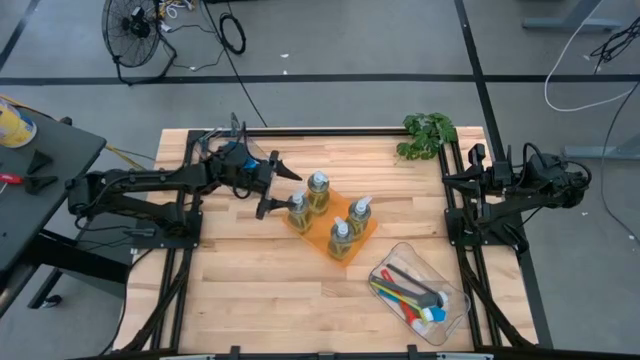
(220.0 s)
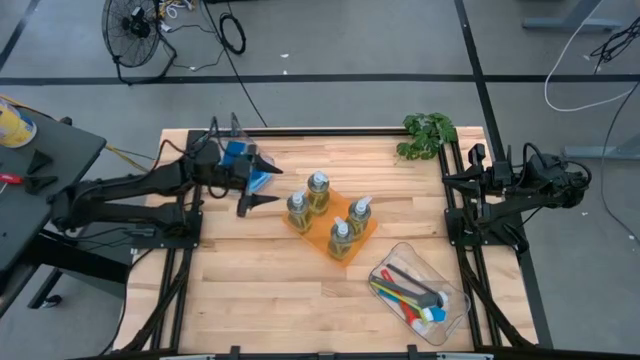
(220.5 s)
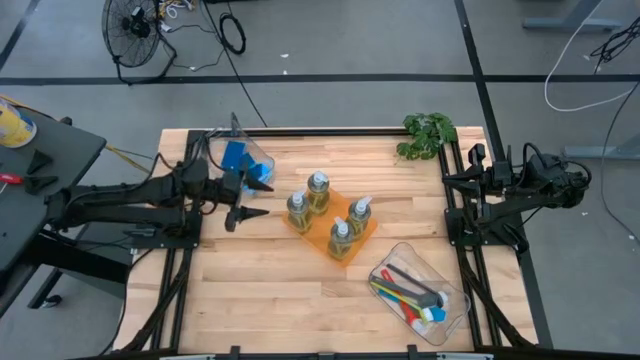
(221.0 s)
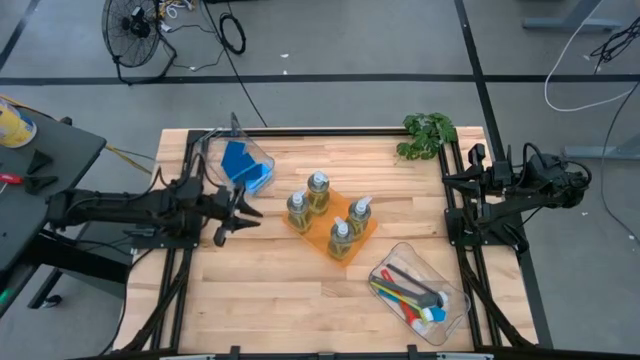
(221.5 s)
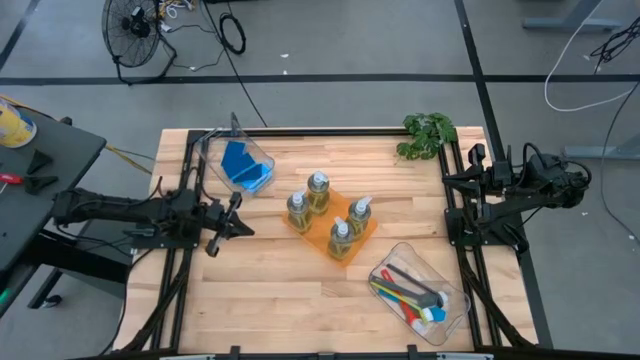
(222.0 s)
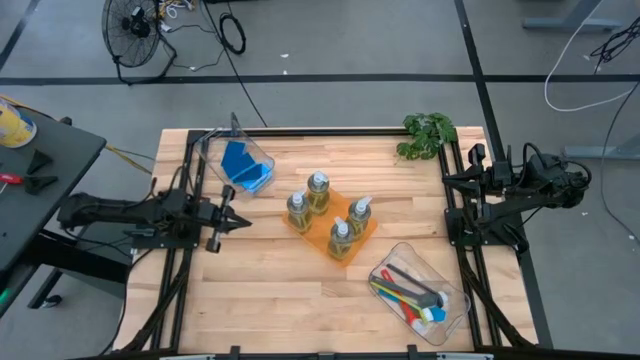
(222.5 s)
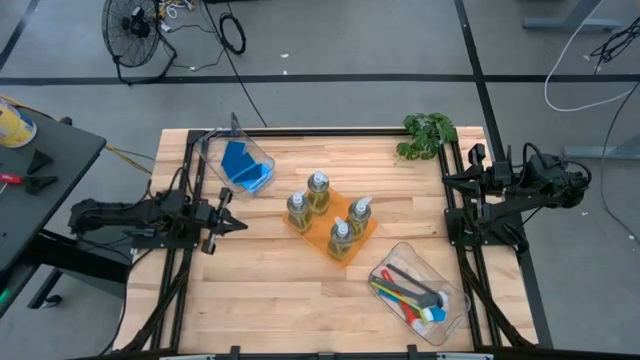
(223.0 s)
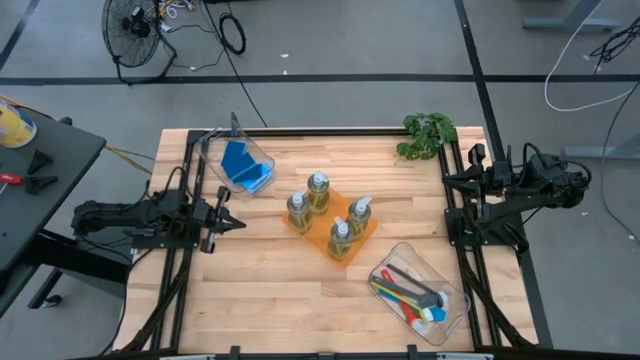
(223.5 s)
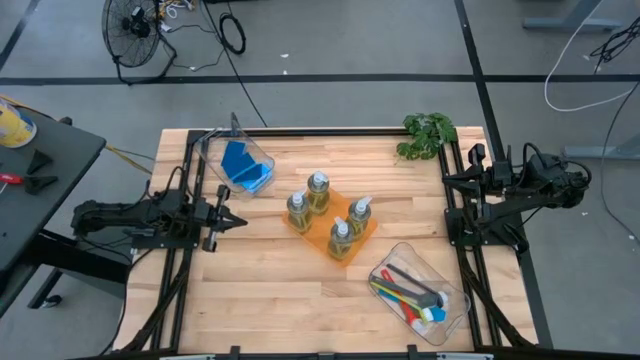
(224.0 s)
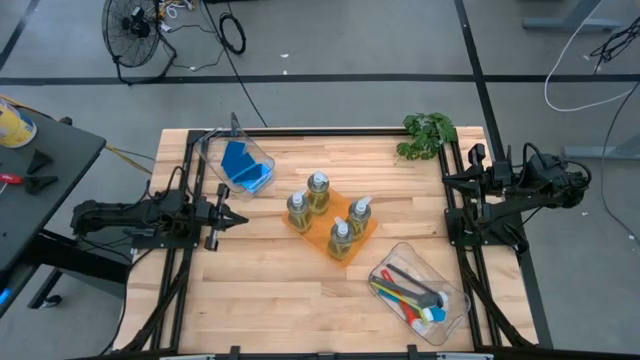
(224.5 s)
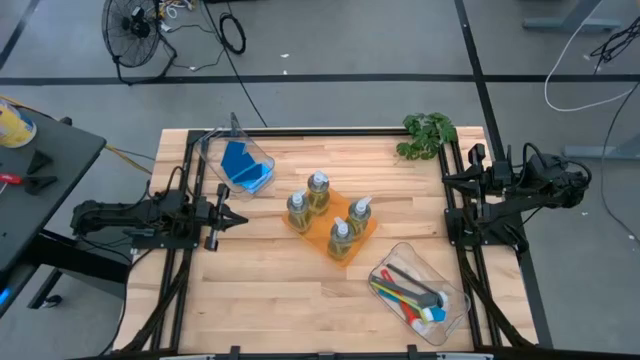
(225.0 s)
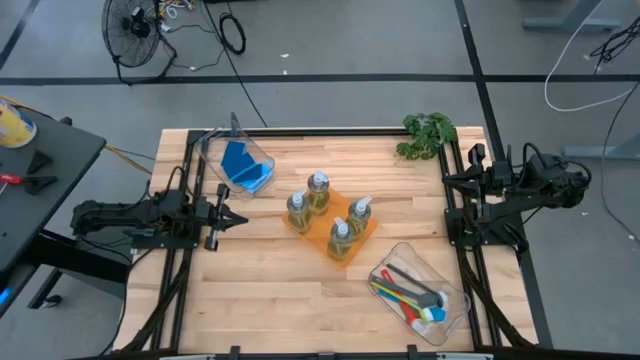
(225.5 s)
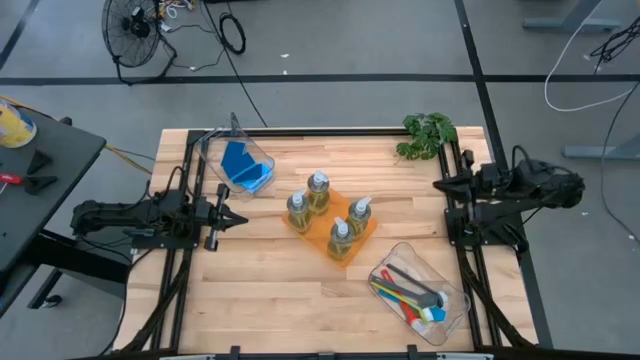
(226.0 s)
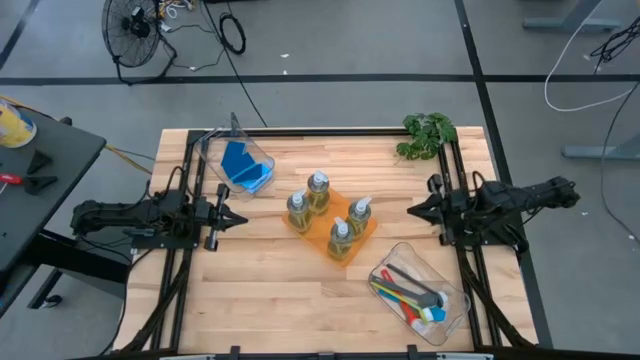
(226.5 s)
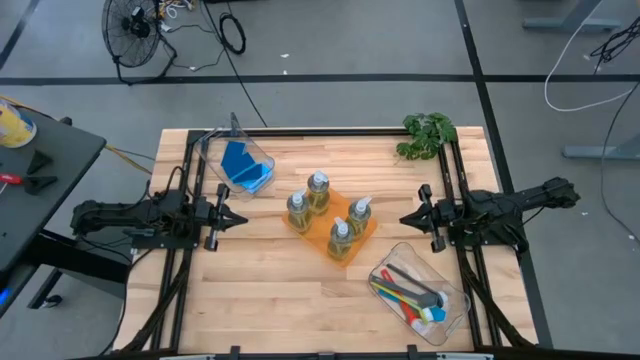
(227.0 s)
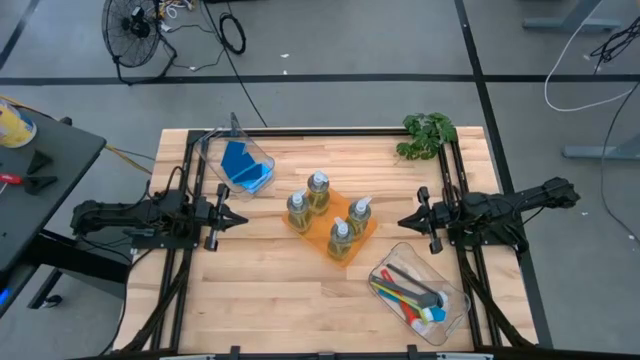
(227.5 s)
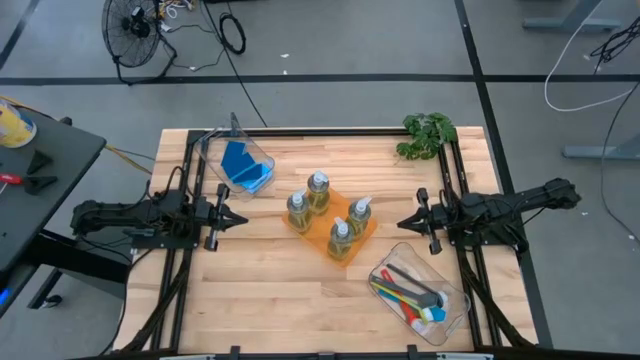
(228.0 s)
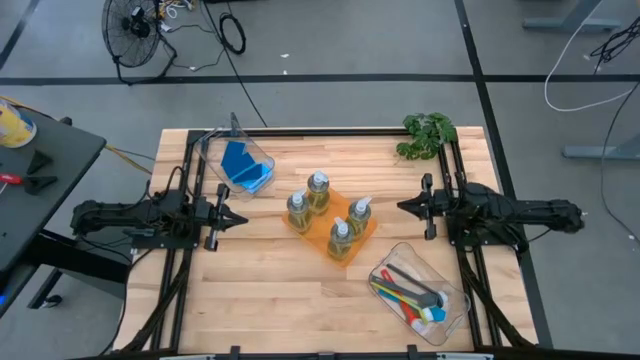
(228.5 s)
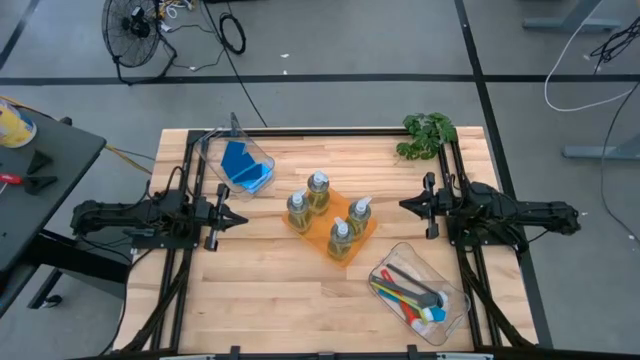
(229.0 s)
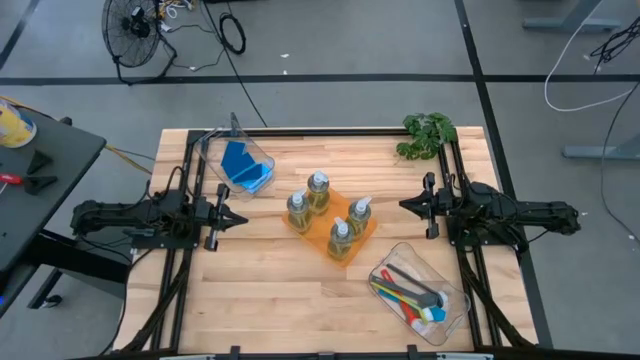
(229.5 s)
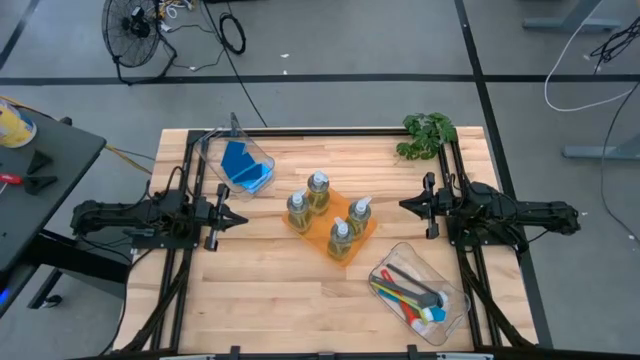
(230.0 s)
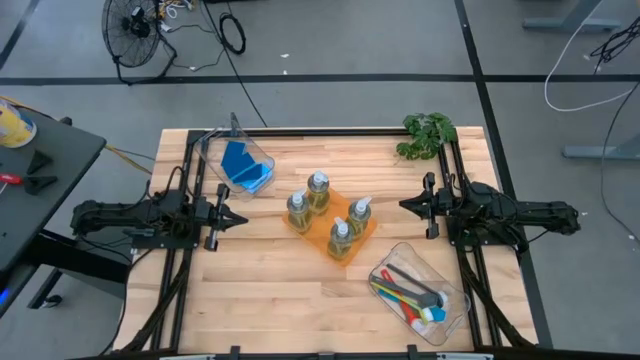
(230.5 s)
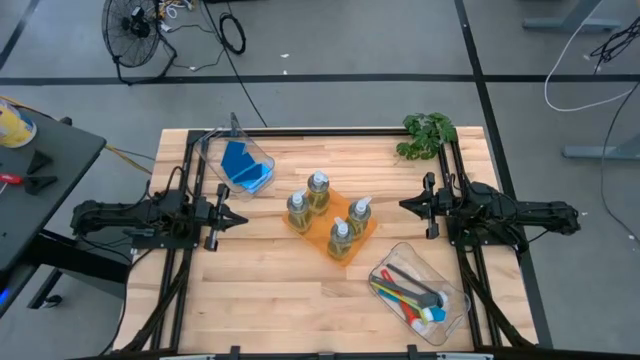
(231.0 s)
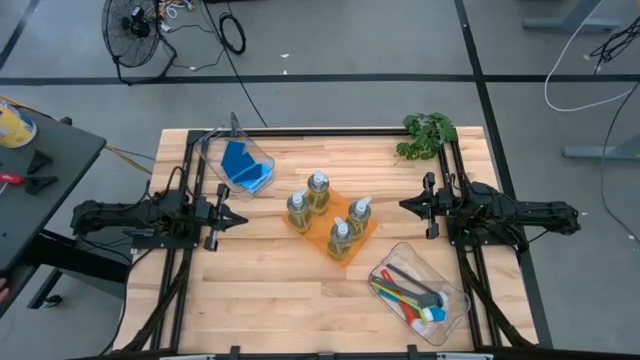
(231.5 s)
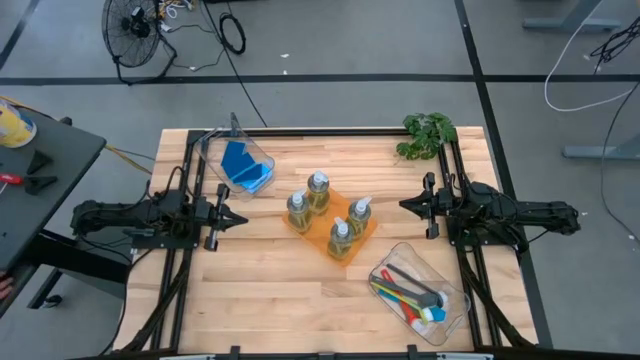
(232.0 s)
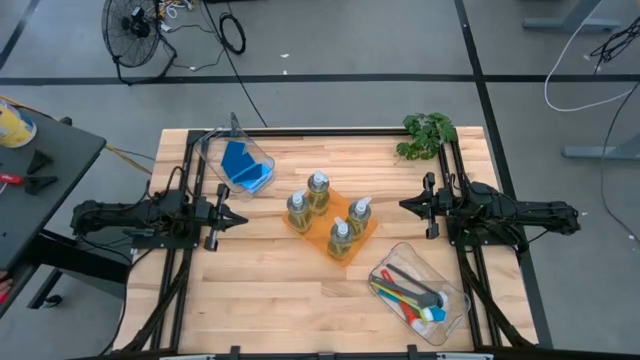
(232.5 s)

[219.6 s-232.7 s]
Task: Pick & Place Kitchen Sink Supplies
Return to Home Position

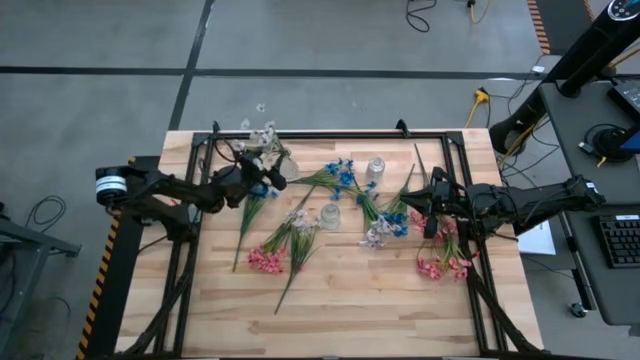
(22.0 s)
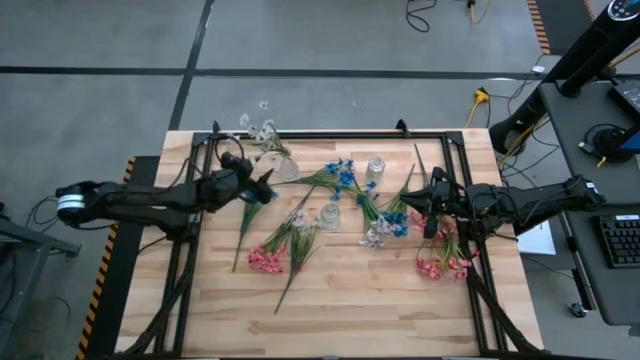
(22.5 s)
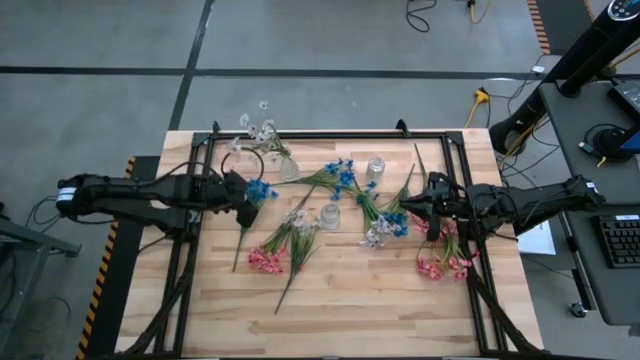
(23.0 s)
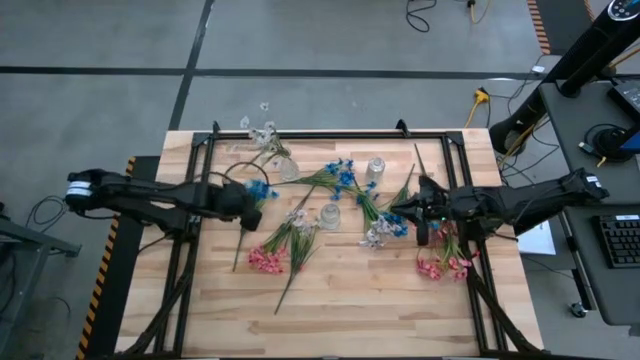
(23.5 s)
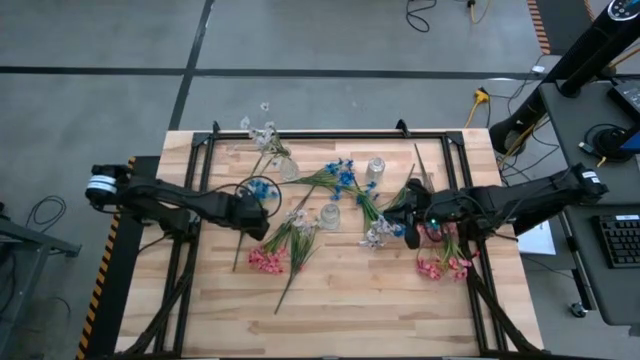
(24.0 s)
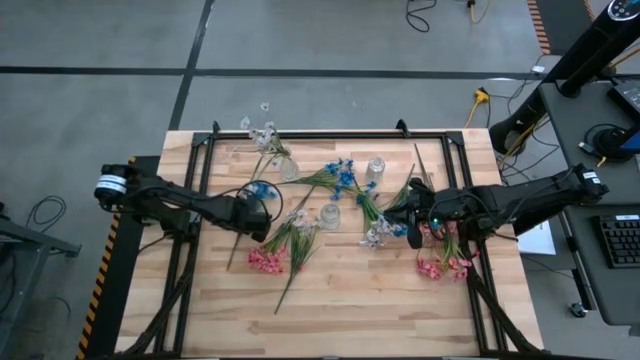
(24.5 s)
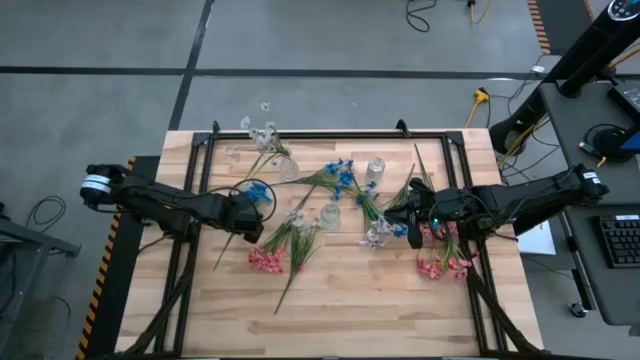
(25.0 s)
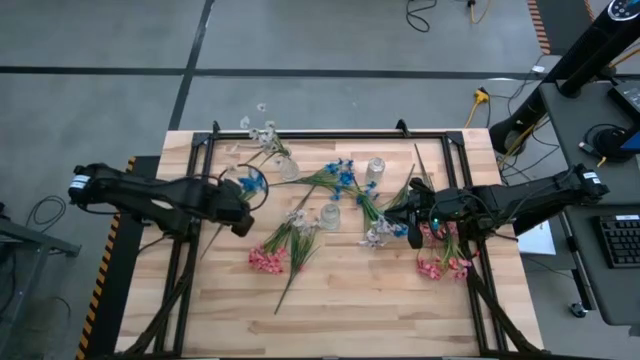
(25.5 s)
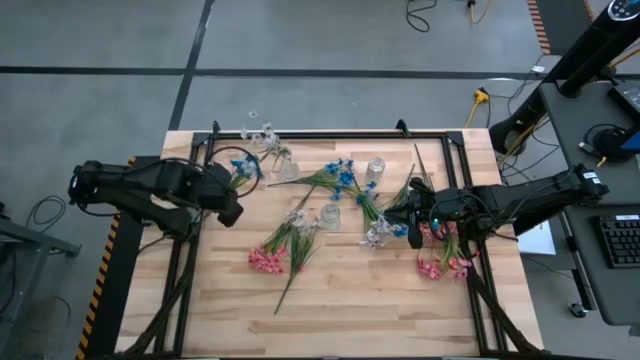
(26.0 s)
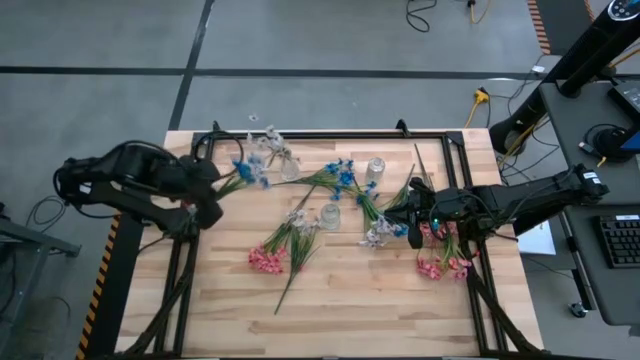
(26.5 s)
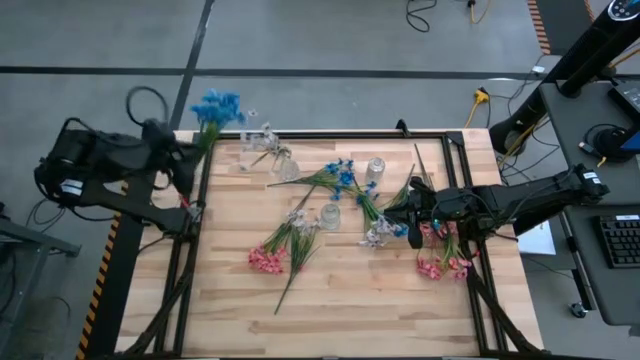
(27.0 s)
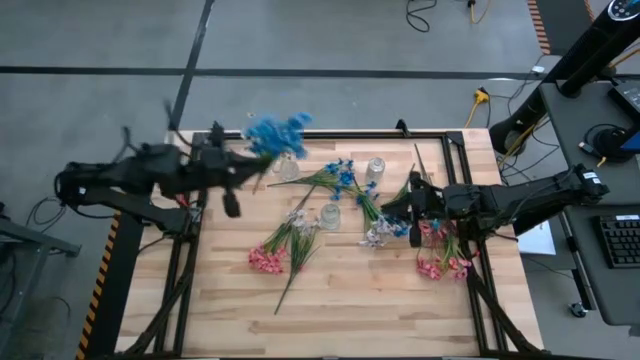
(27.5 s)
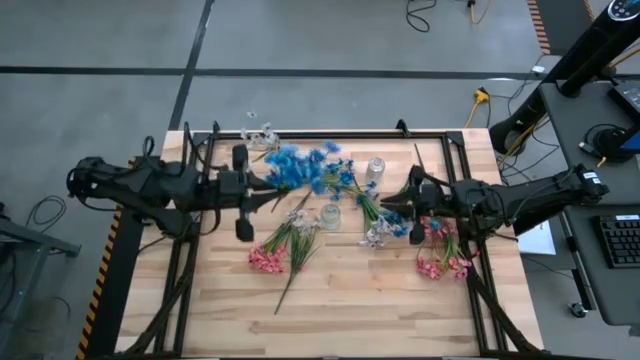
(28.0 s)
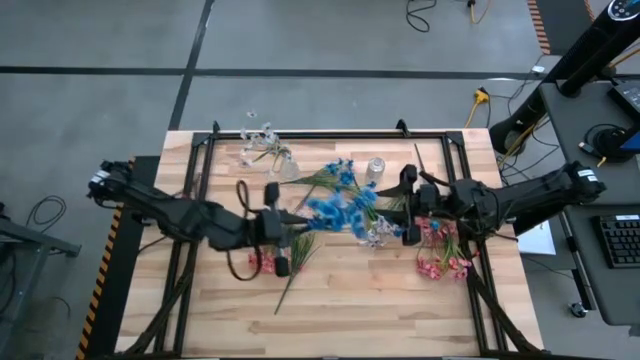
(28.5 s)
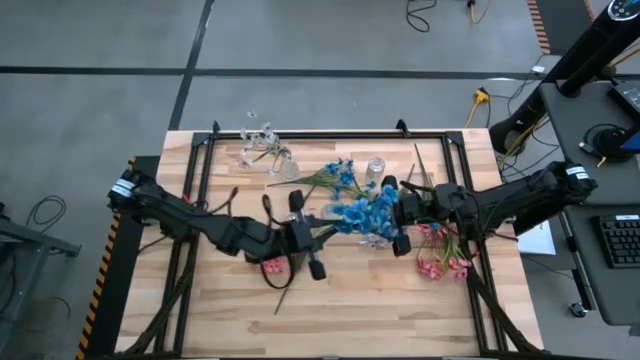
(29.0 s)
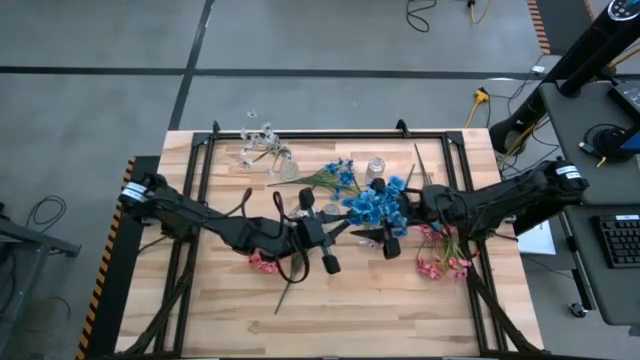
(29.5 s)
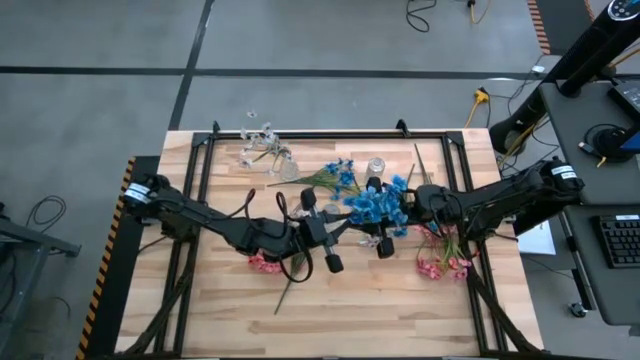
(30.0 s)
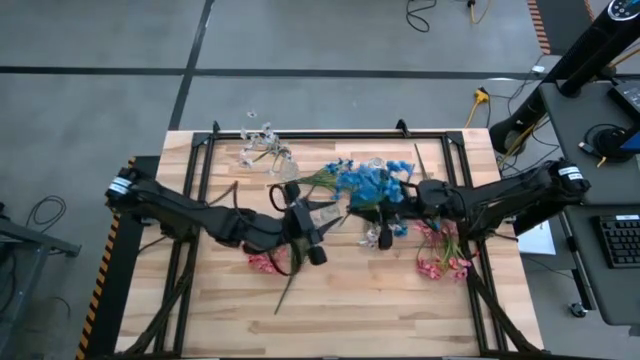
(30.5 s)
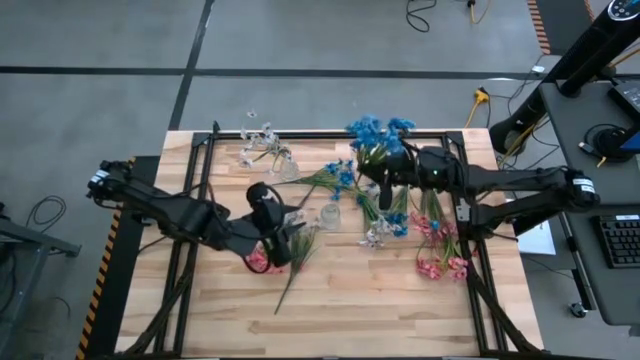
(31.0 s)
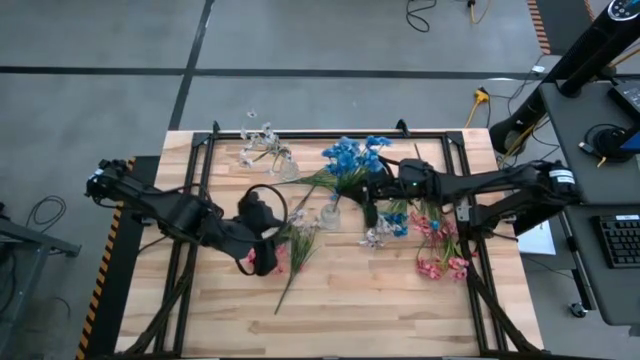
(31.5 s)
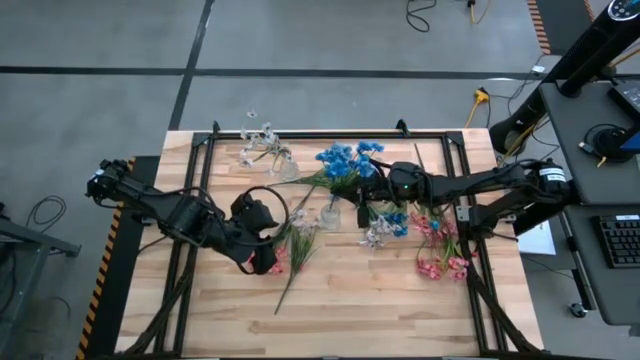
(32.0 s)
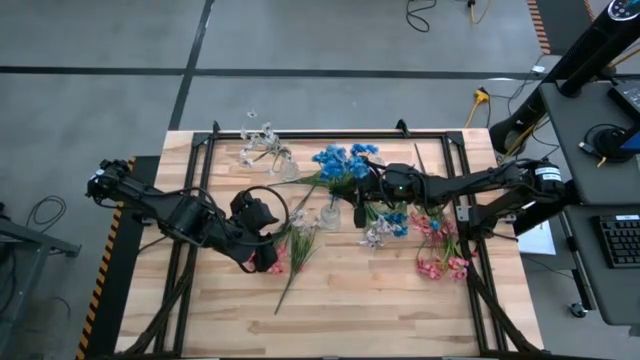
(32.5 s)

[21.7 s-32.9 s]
Task: Sort flowers into vase by color
Put the left blue flower into the middle transparent vase
